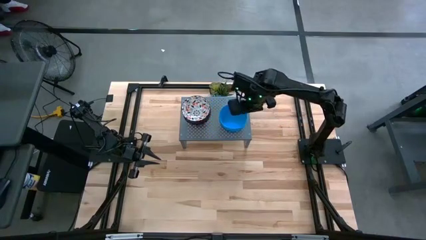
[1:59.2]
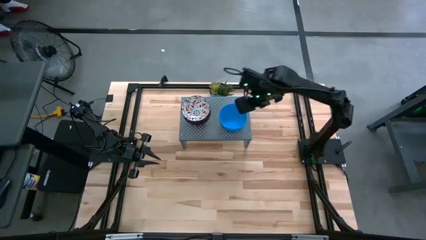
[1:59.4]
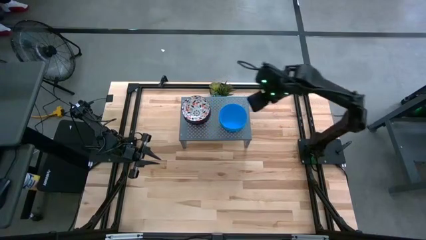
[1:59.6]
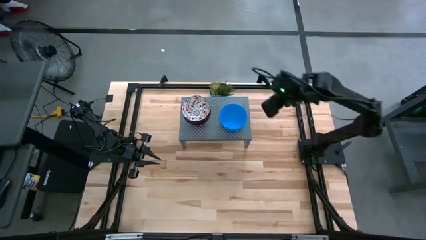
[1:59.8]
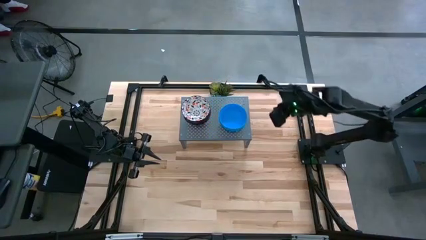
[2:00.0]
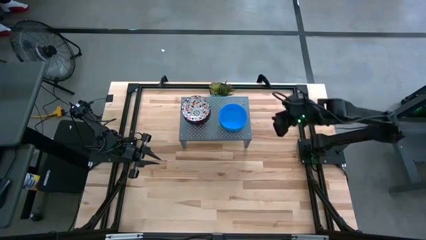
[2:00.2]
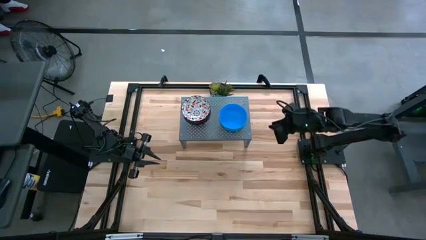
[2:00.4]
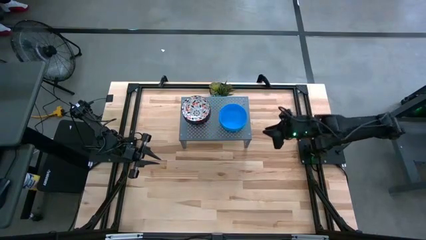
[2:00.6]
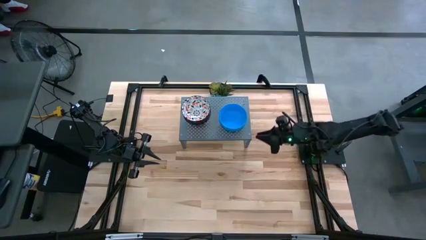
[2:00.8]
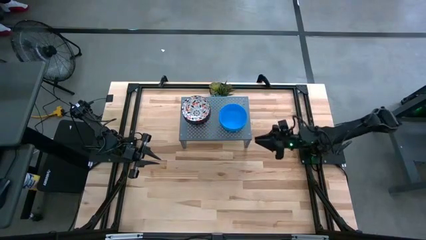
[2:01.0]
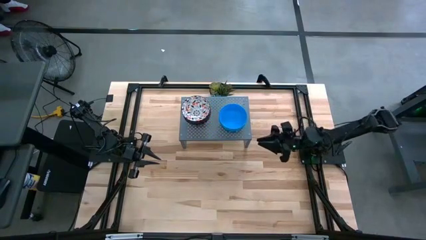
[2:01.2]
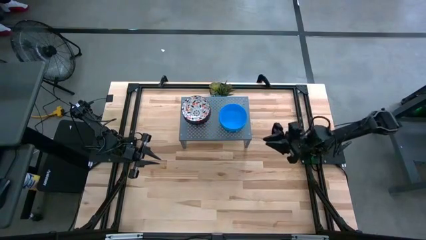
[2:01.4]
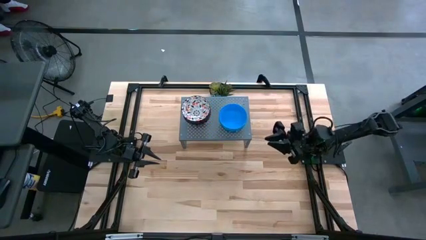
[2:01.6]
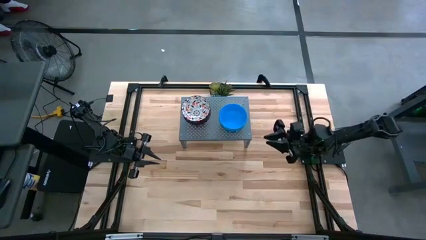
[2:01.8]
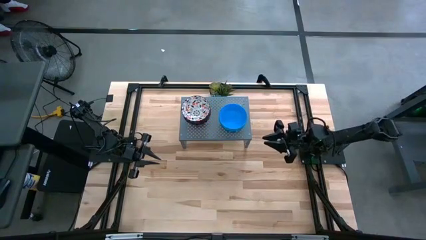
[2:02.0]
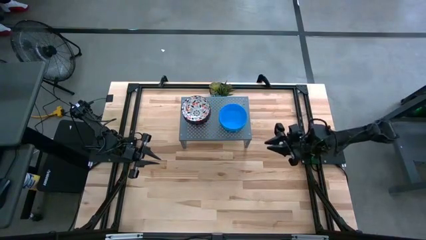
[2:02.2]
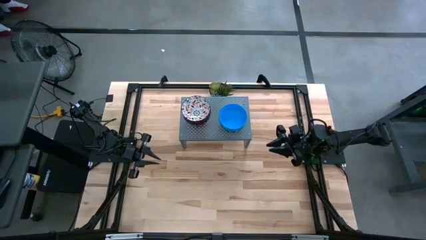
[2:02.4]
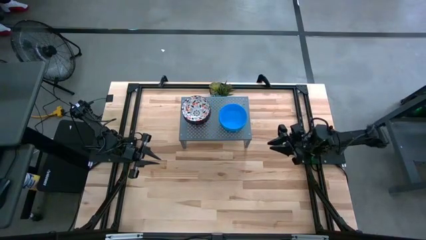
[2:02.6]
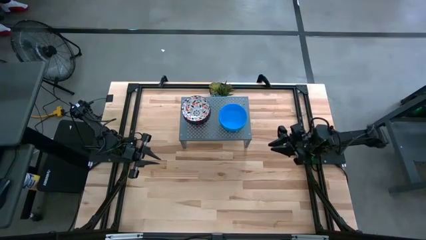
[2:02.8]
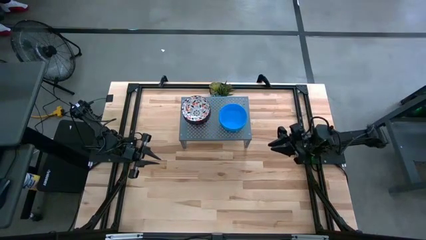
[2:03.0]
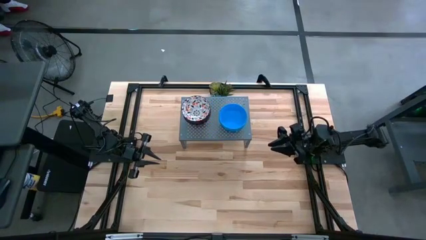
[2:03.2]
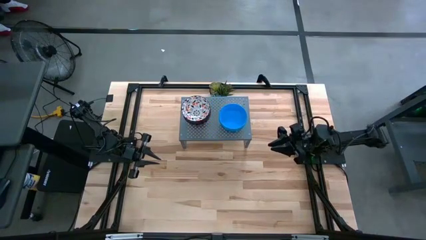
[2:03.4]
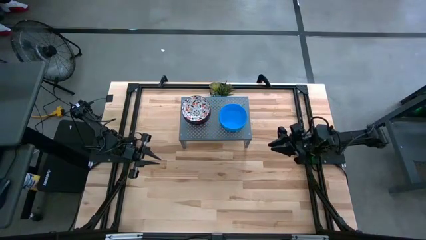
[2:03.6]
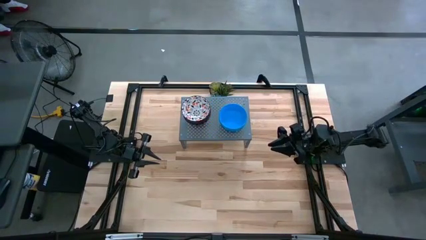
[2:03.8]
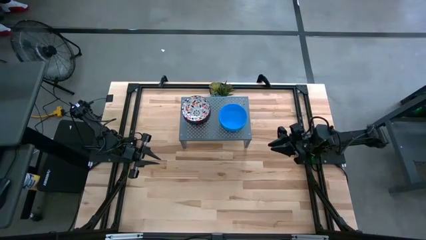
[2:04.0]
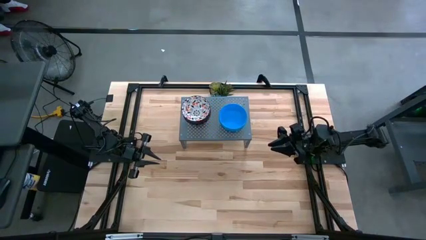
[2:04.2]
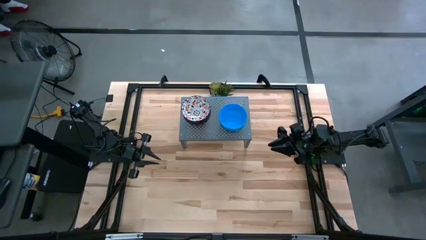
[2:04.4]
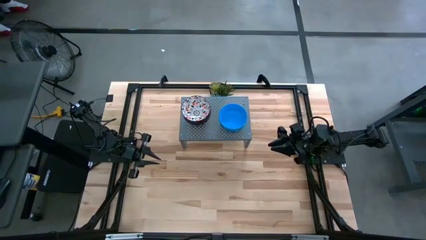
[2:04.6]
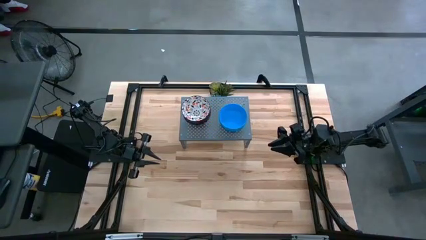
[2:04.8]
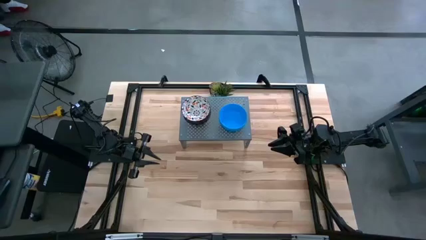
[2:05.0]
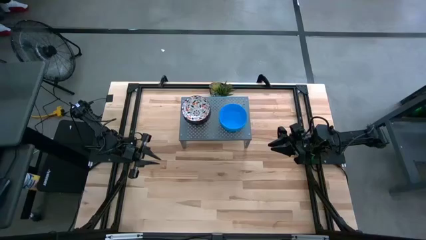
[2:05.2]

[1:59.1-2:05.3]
Task: Pick & Place Mini bowls
Return to home position

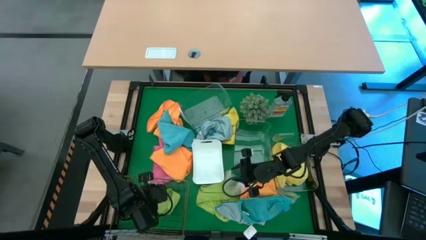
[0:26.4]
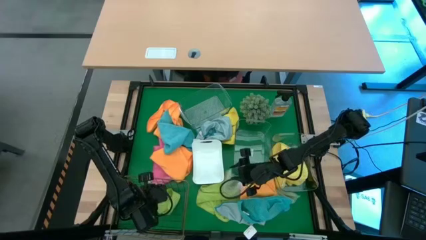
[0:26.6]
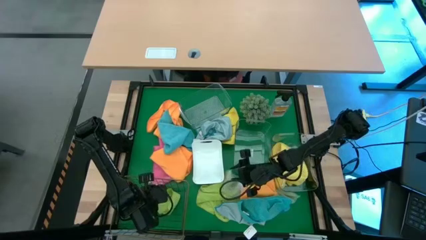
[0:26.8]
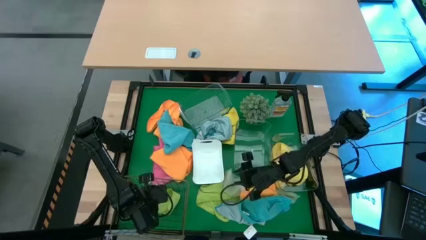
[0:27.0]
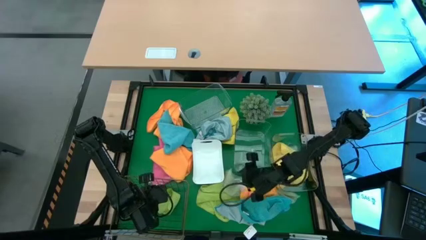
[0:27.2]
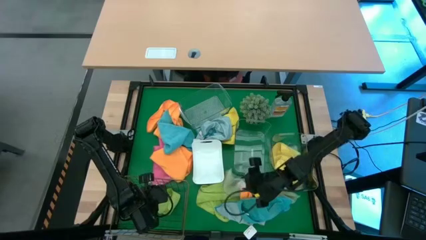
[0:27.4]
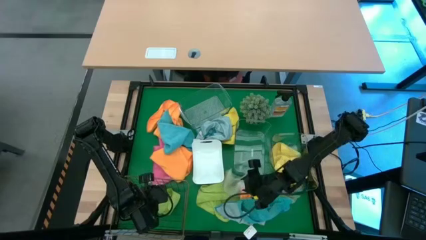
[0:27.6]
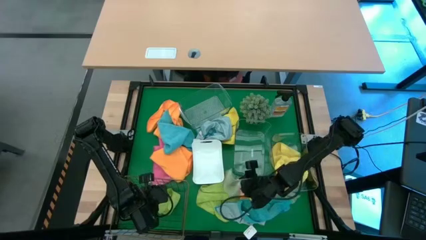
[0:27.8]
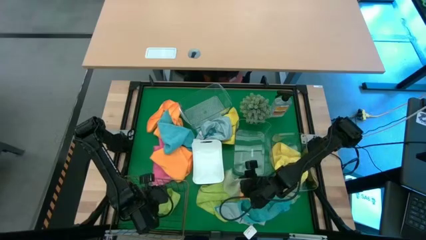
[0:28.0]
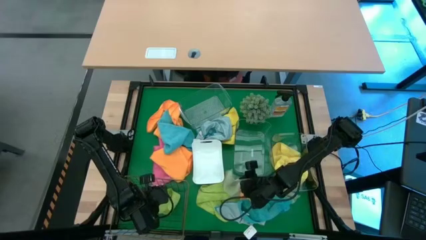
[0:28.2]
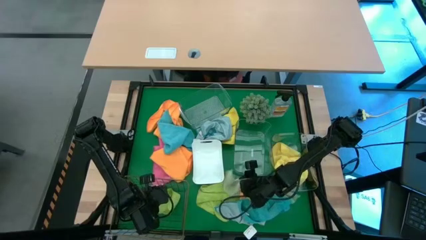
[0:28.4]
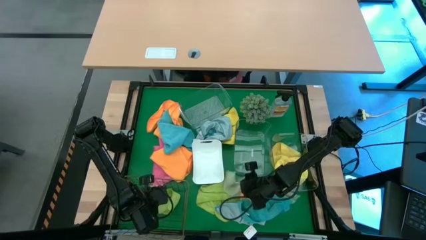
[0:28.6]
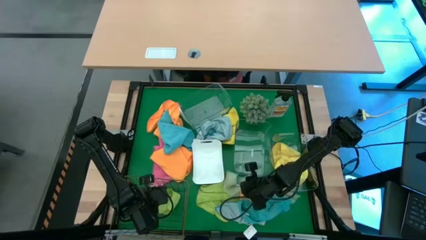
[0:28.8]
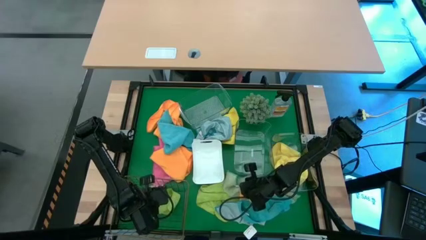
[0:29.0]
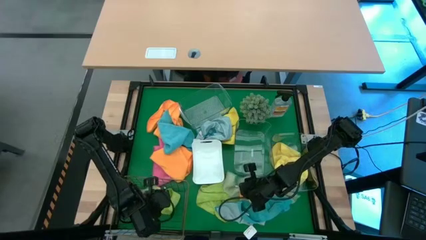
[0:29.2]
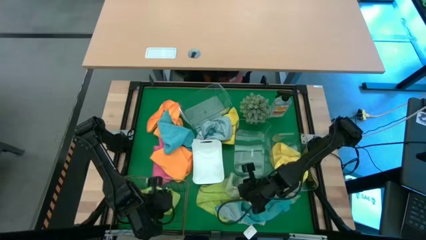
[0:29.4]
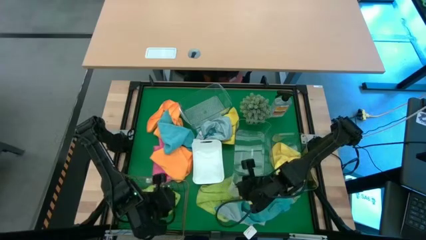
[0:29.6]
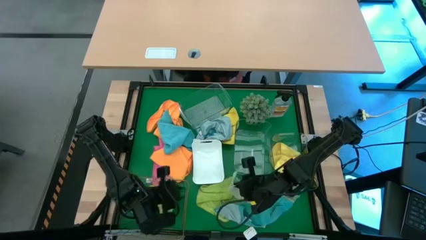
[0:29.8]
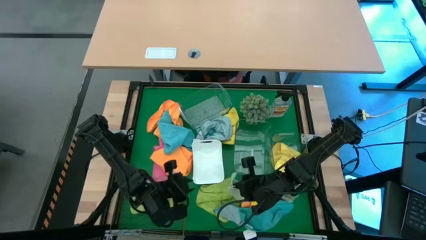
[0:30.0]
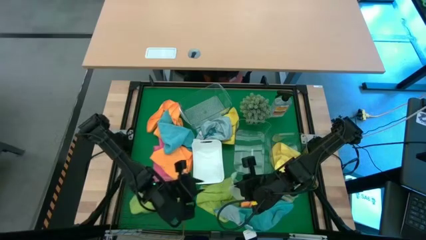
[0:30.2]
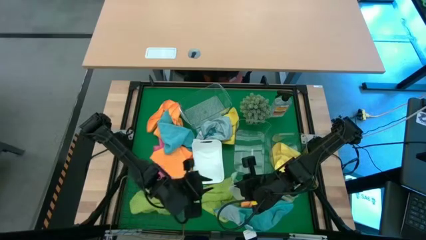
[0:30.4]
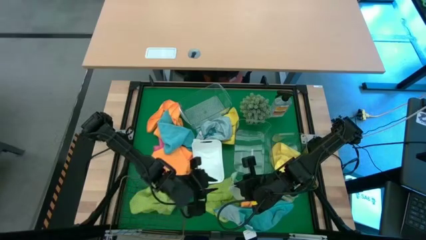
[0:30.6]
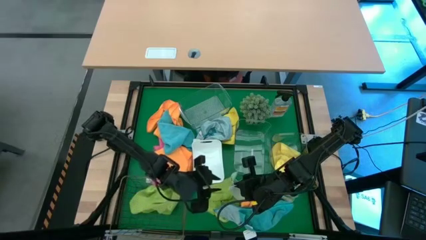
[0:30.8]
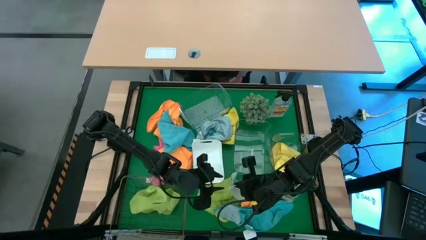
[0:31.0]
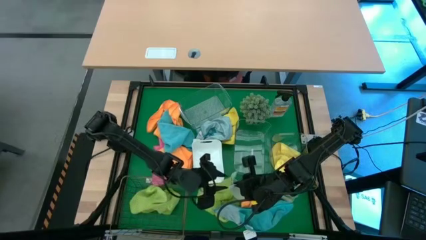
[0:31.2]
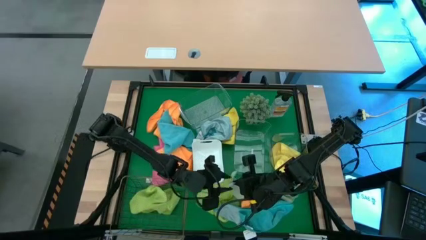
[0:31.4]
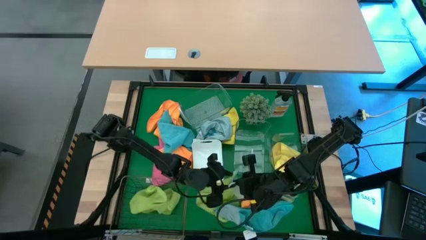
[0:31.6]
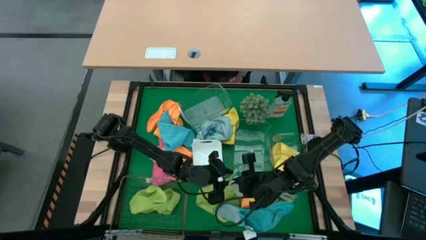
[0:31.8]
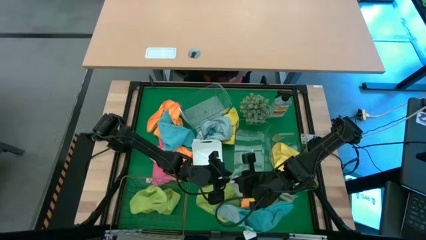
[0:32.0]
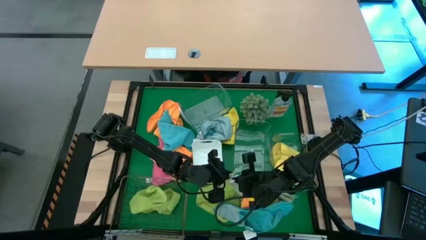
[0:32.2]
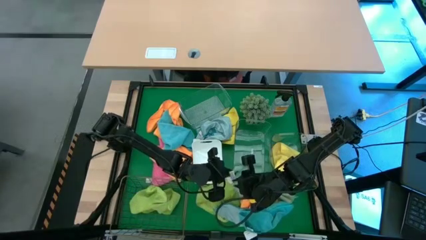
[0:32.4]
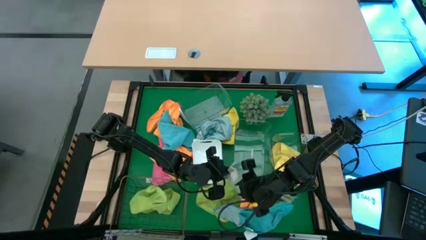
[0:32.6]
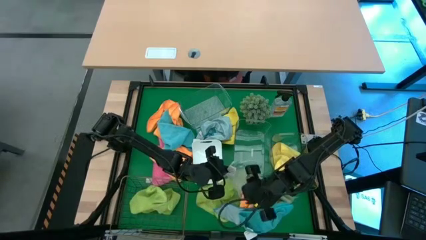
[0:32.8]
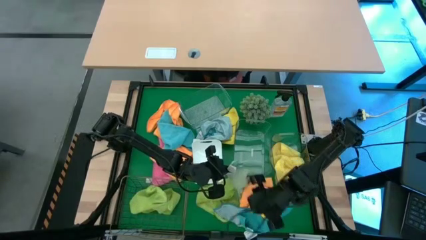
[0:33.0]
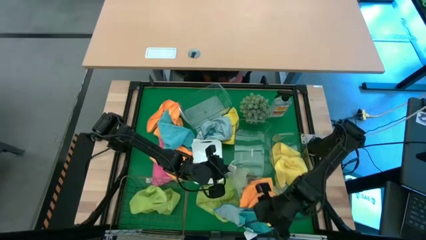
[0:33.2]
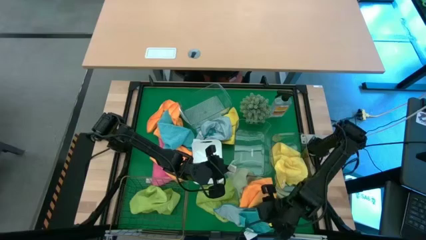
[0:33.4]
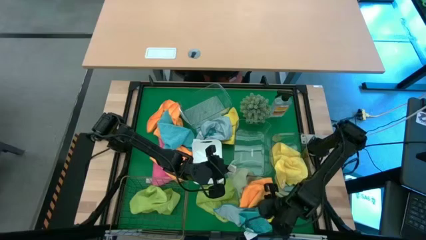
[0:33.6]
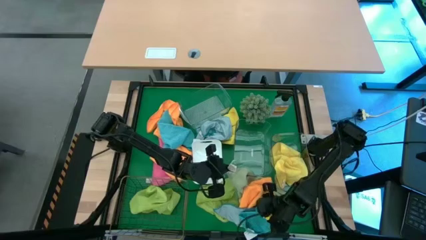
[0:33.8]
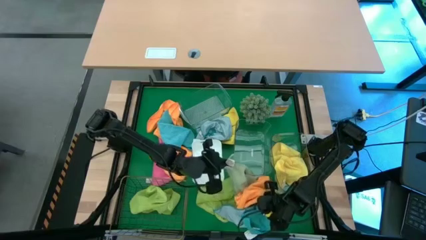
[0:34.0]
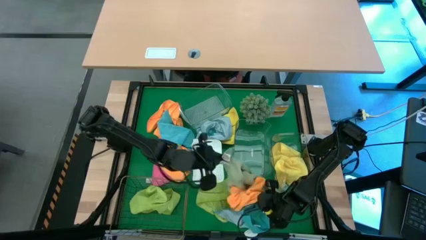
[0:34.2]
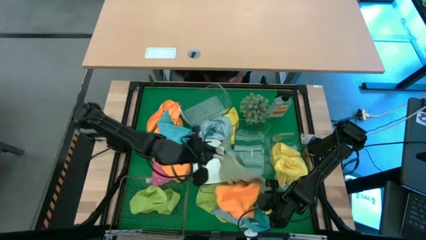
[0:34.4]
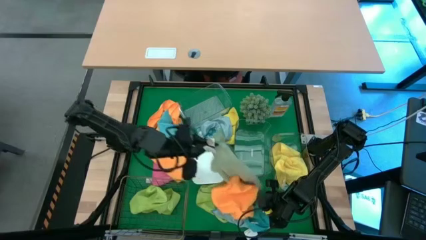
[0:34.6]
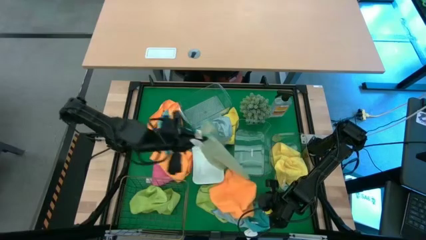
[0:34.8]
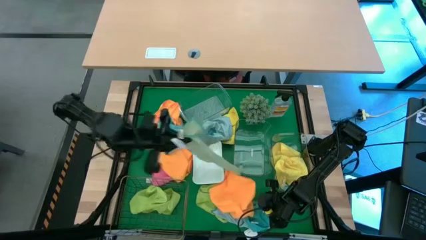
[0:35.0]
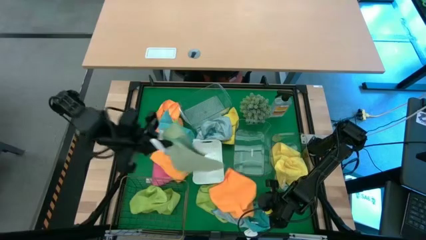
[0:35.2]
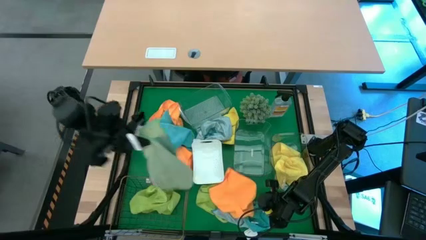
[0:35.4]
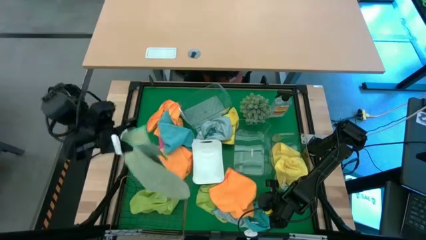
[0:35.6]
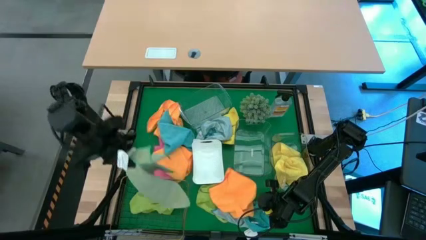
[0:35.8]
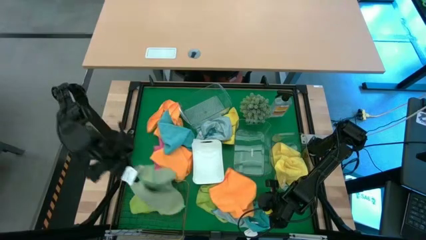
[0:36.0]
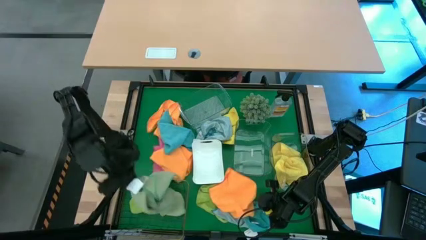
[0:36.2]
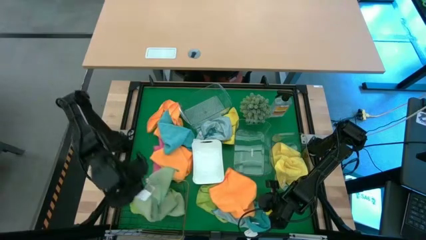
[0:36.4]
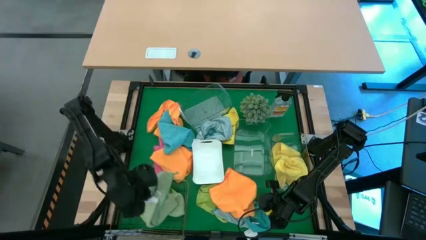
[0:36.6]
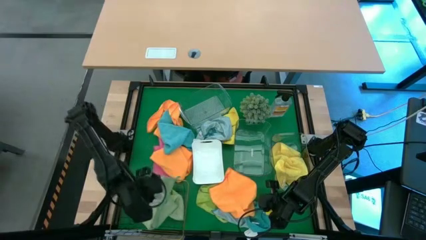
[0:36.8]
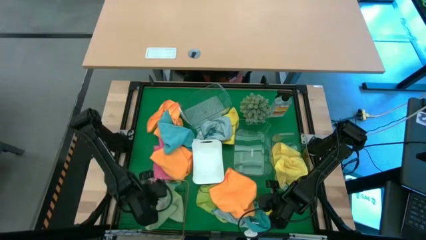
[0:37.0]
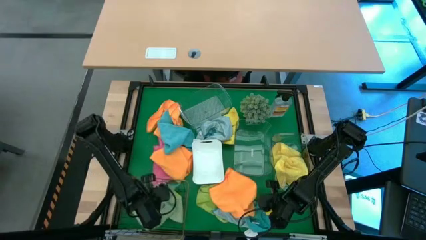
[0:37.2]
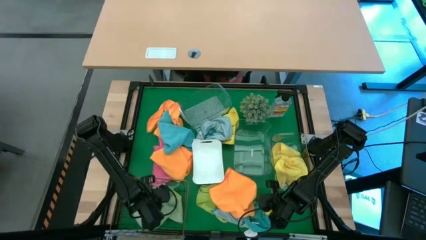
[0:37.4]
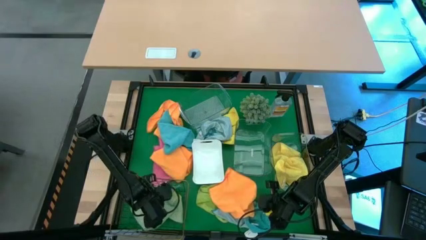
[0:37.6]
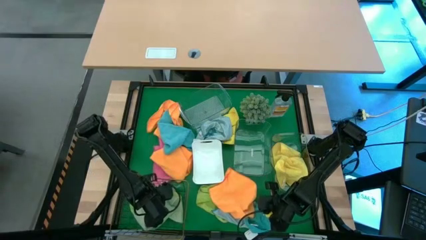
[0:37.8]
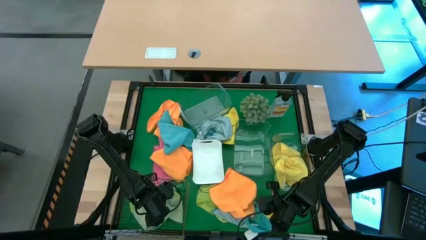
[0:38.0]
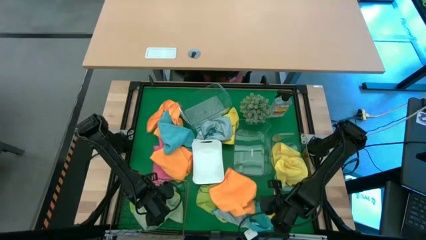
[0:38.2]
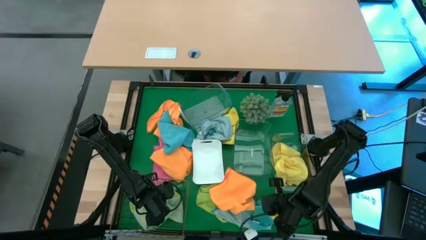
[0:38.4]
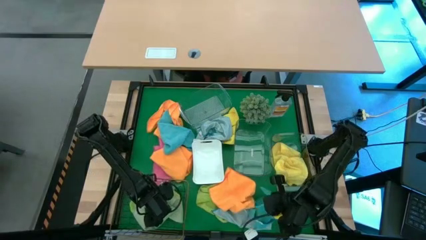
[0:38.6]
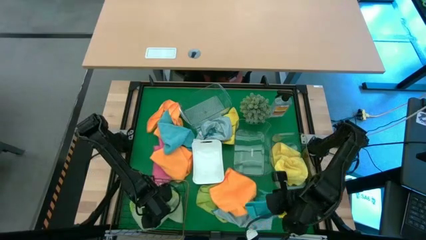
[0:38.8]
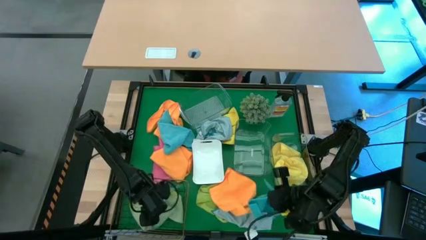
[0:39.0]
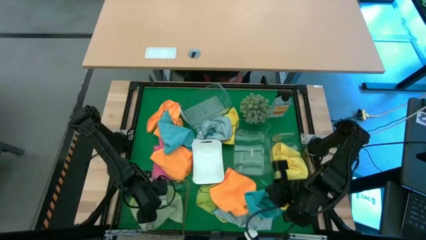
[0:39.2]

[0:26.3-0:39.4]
Task: Sort microfiber towel by color & place in baskets
Put the light green microfiber towel into the gold wire basket
